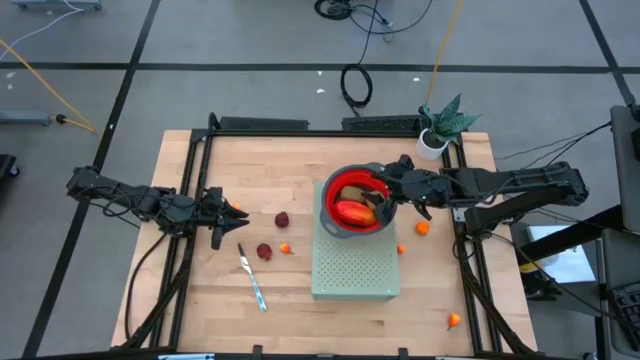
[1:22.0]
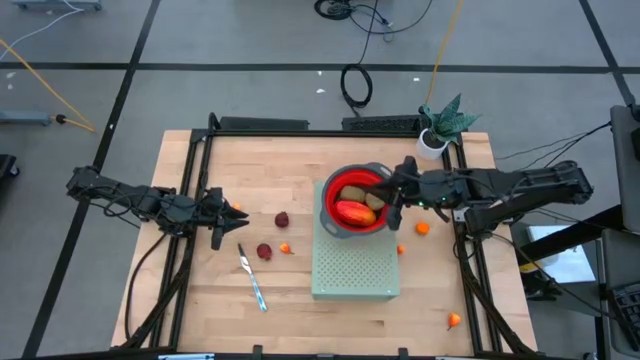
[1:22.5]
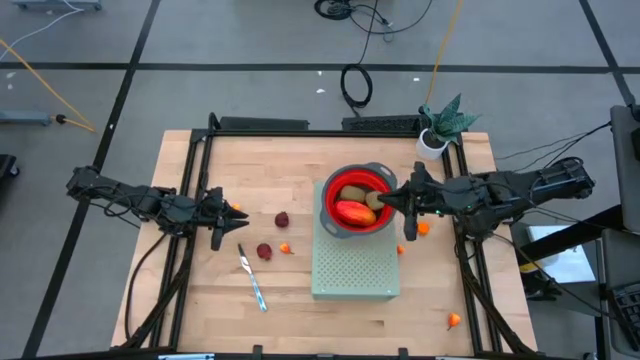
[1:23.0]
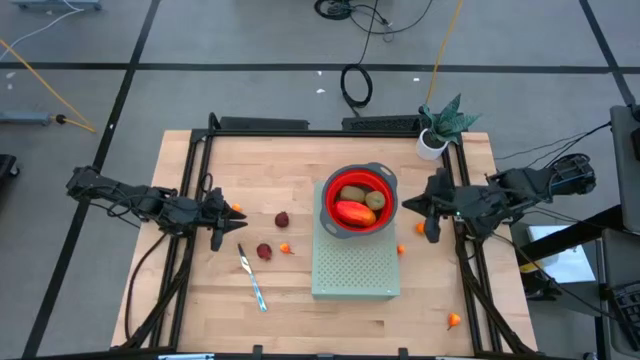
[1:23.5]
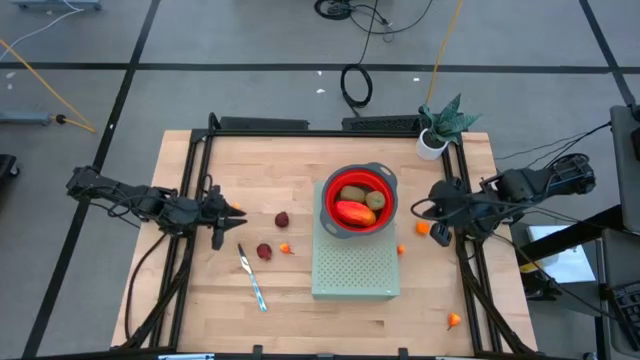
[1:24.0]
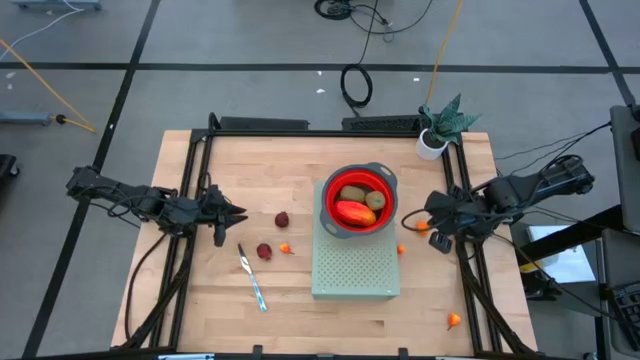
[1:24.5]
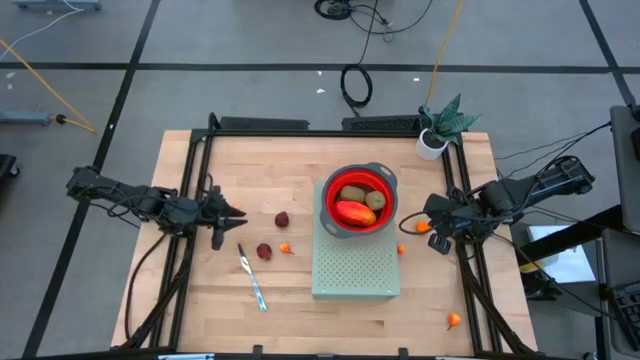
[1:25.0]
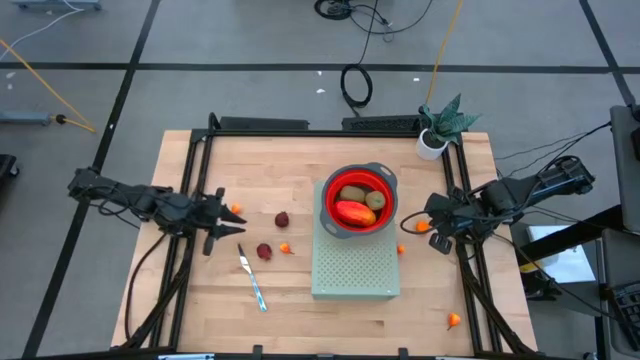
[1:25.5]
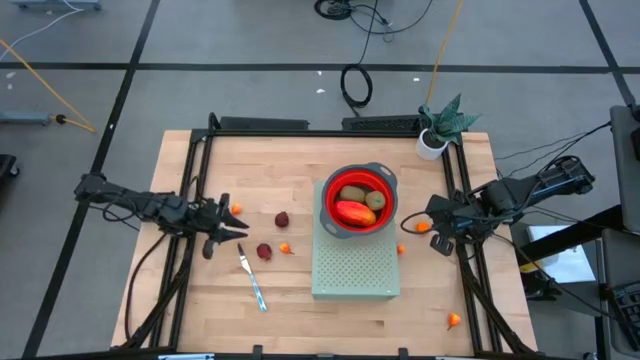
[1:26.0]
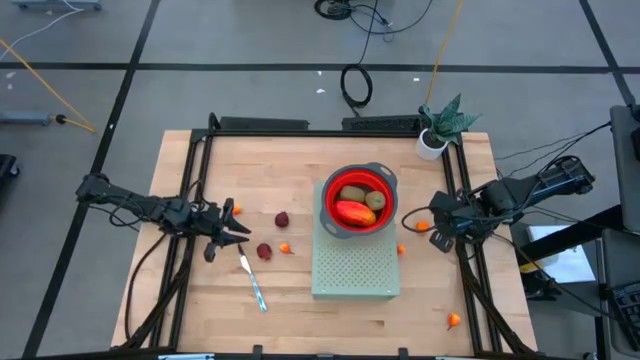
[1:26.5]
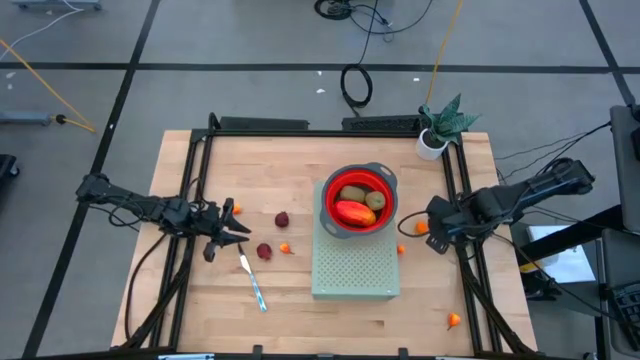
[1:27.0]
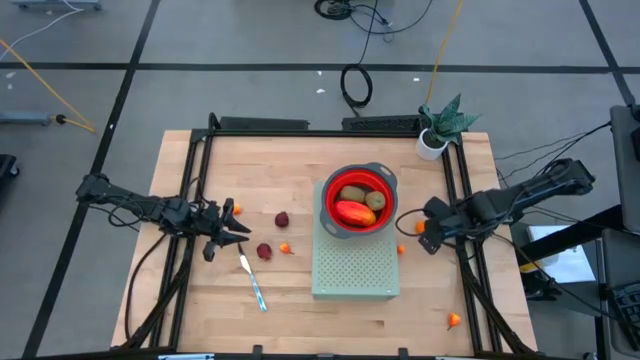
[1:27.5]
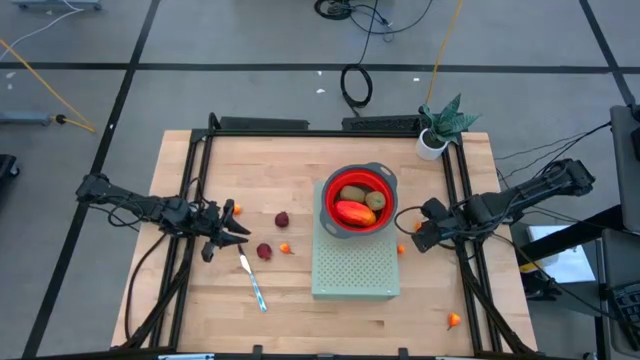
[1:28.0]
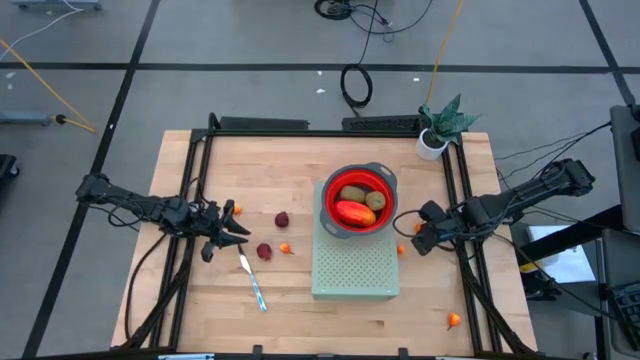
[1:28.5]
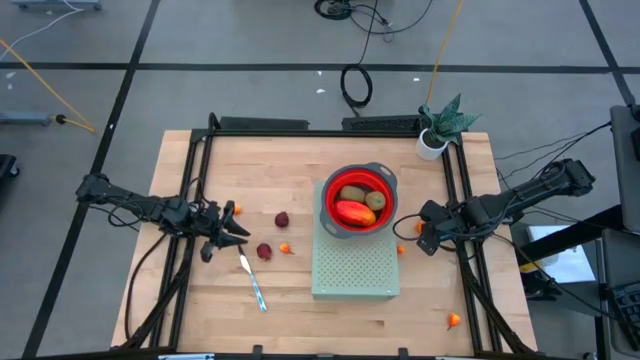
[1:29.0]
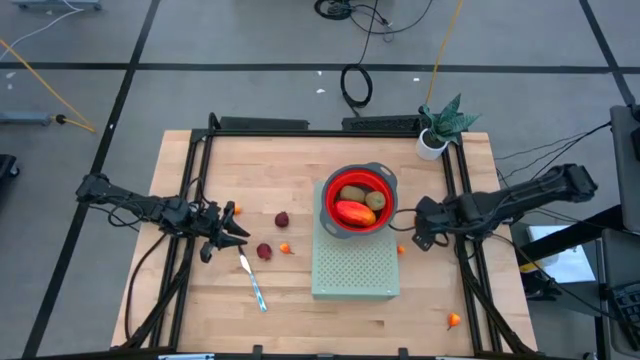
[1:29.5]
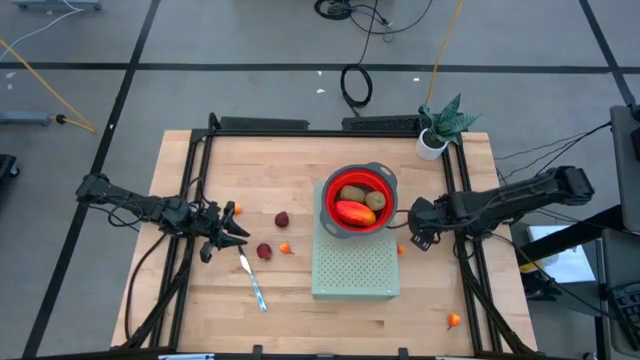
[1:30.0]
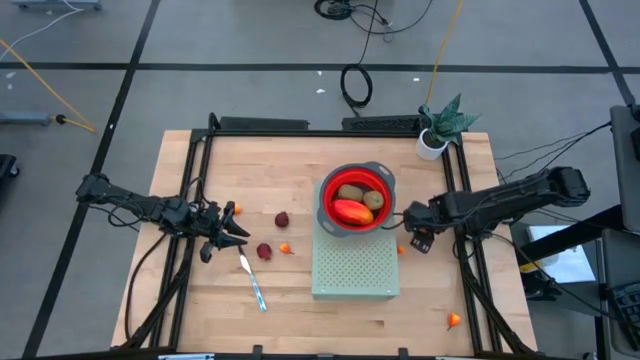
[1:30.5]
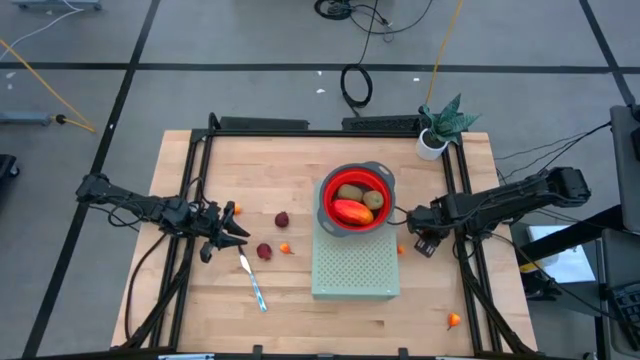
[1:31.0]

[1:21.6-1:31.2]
Task: Pick & Place Fruit
Put the orange into the red strainer bowl on the shelf

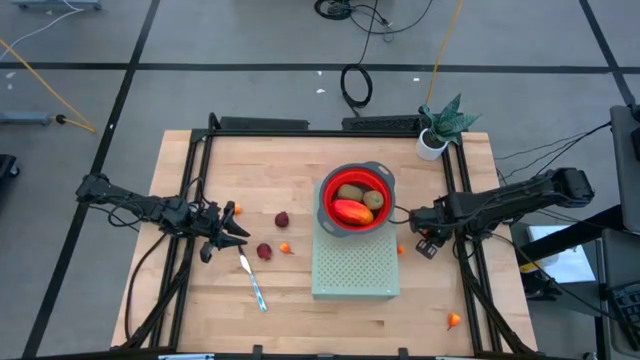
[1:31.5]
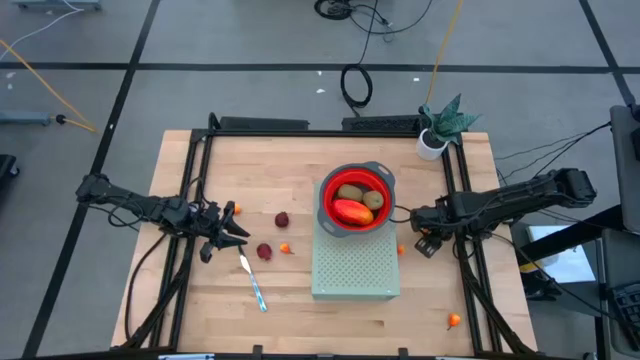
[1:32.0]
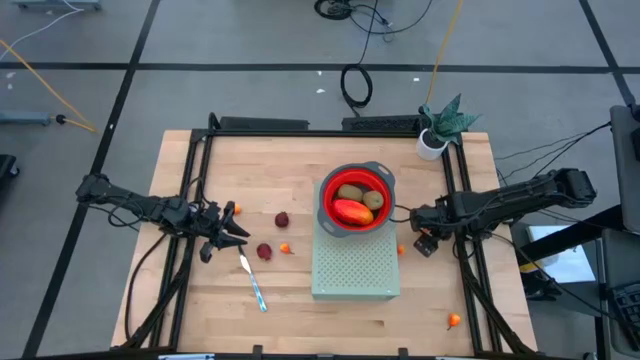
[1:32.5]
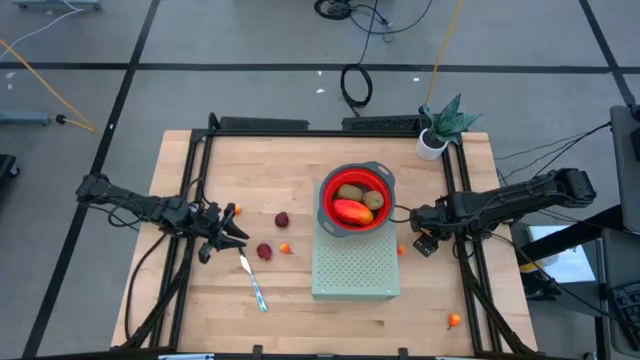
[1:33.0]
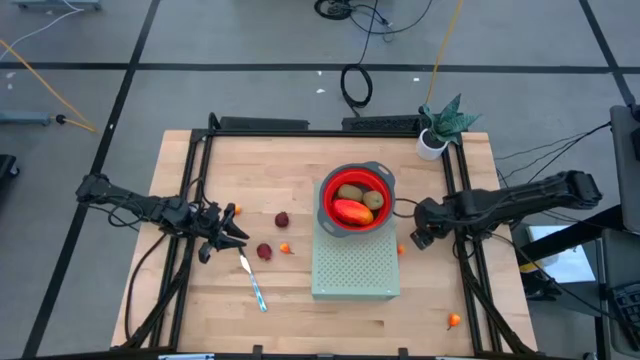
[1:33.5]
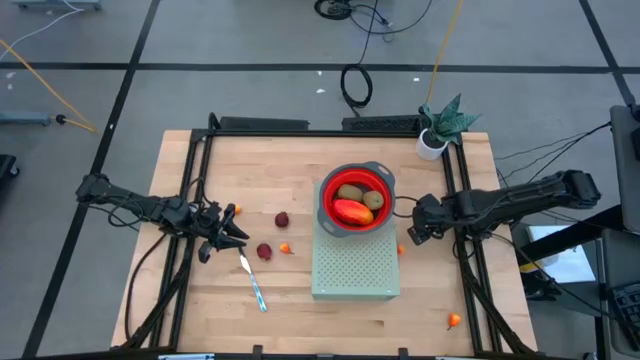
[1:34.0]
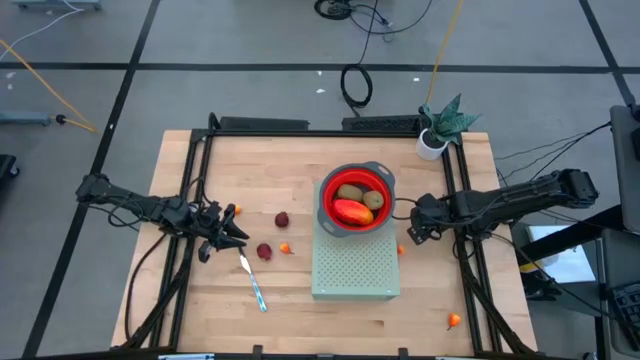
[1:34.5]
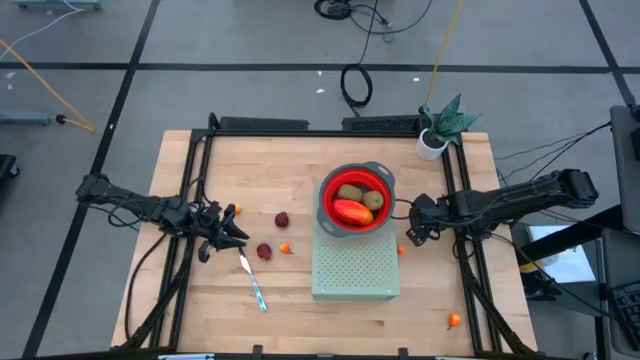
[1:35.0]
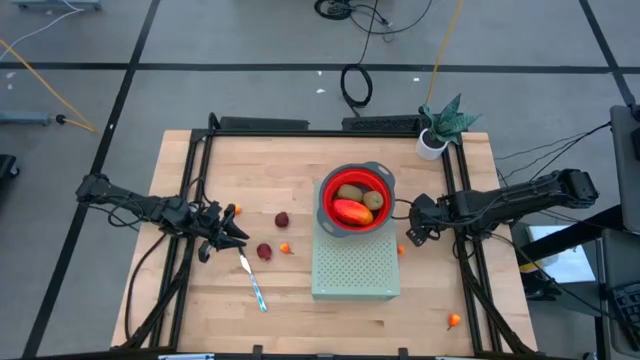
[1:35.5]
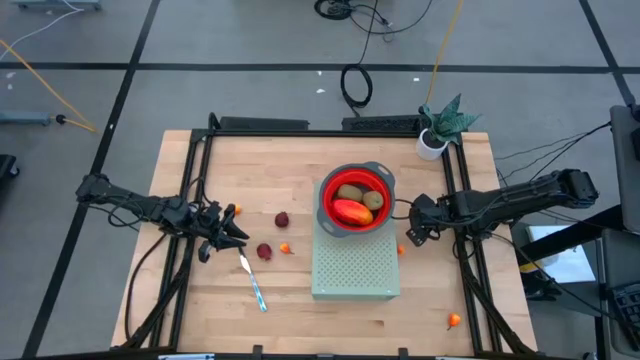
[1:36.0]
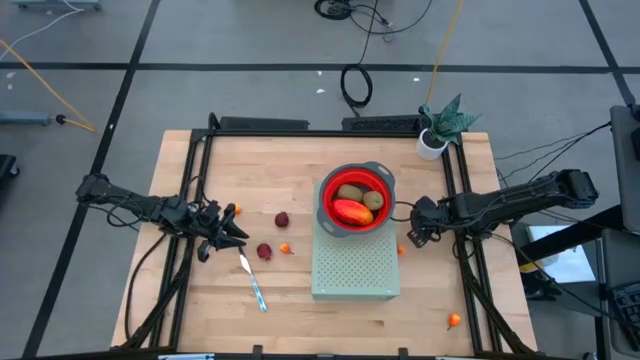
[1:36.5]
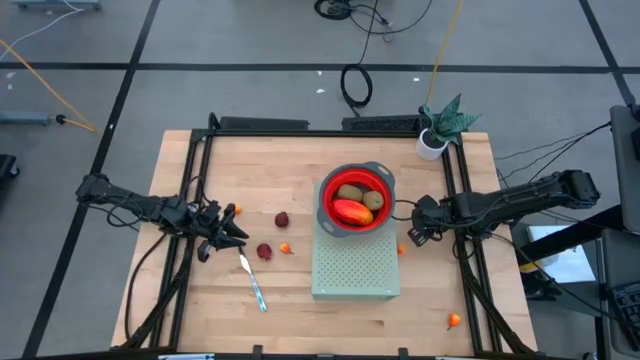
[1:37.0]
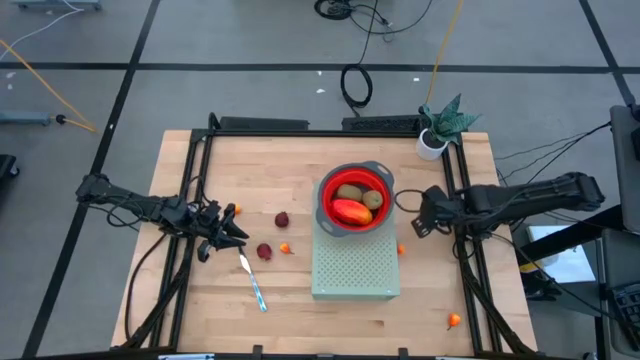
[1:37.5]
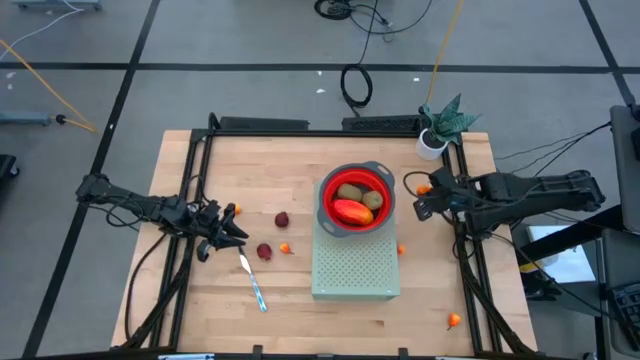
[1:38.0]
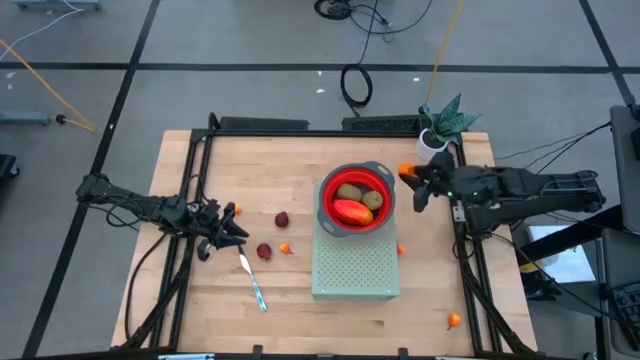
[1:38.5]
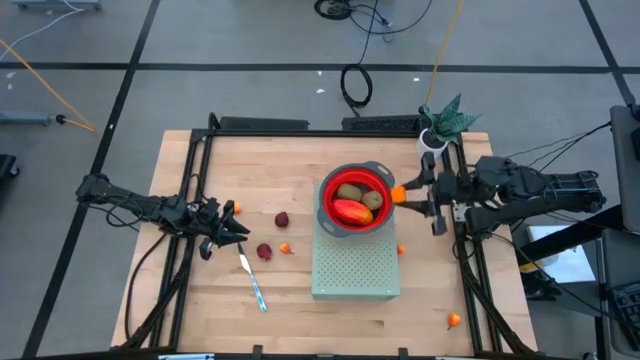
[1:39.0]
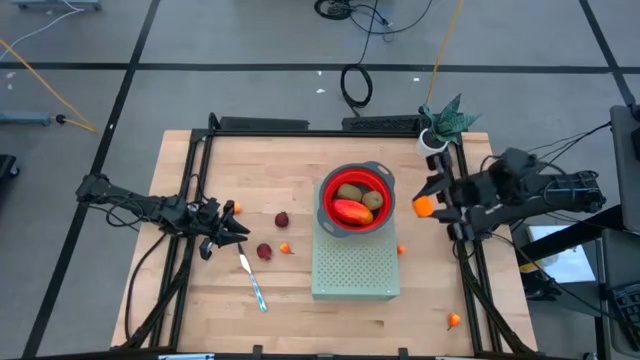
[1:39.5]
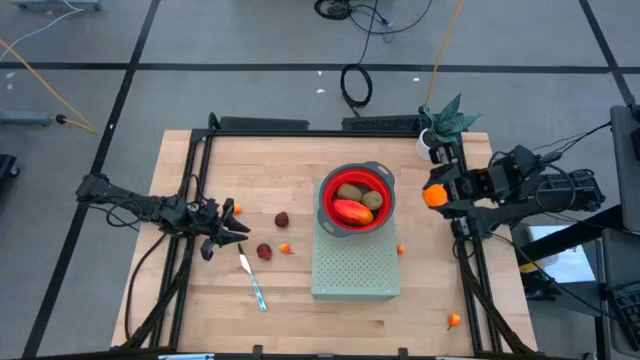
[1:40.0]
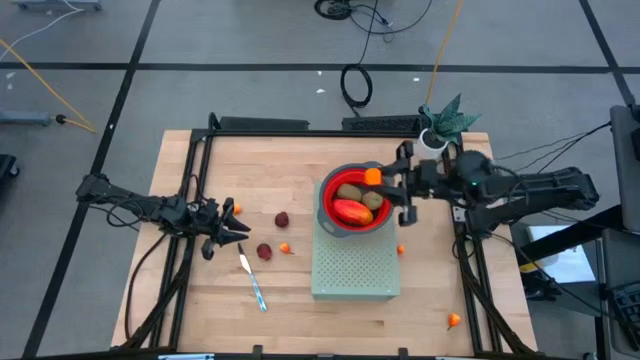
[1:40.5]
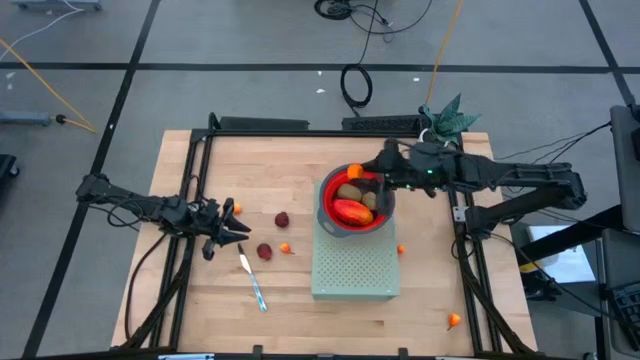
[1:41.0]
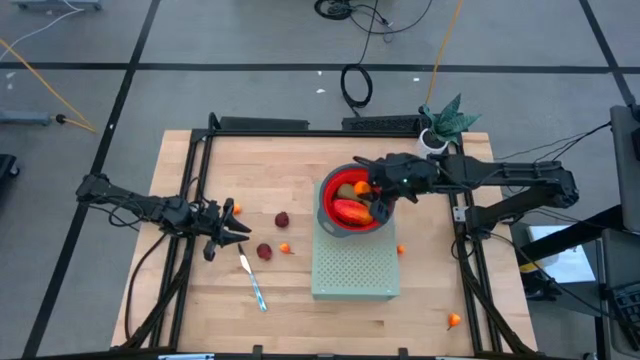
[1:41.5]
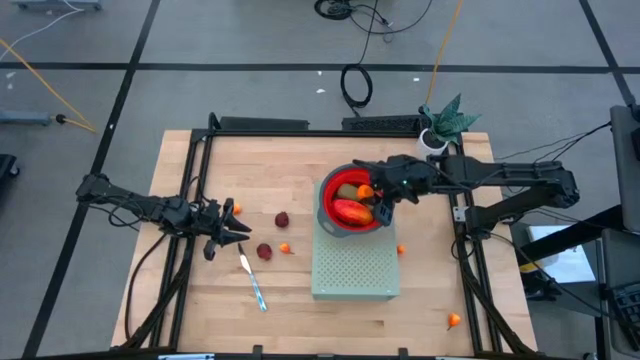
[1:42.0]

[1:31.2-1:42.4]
Put the orange into the red strainer bowl on the shelf
